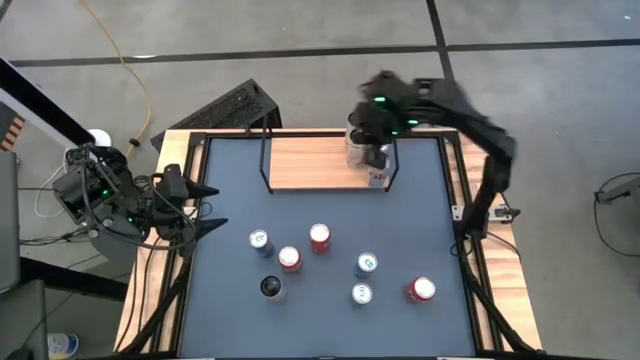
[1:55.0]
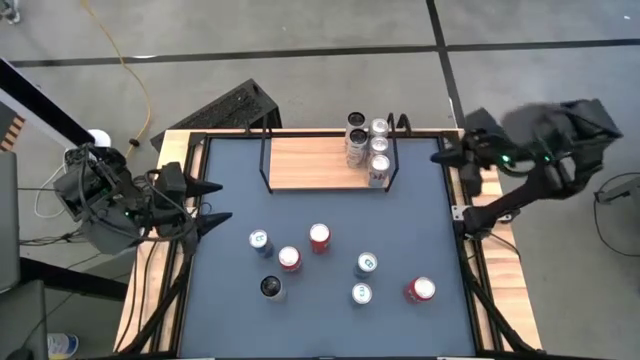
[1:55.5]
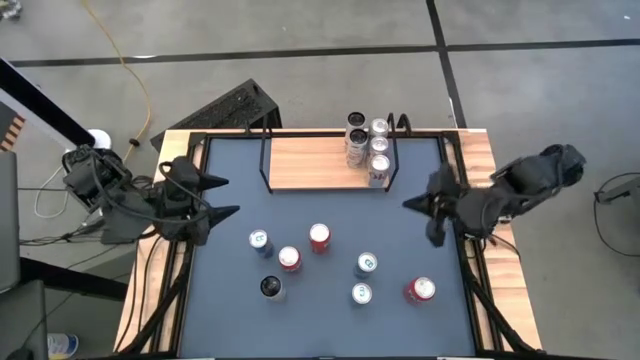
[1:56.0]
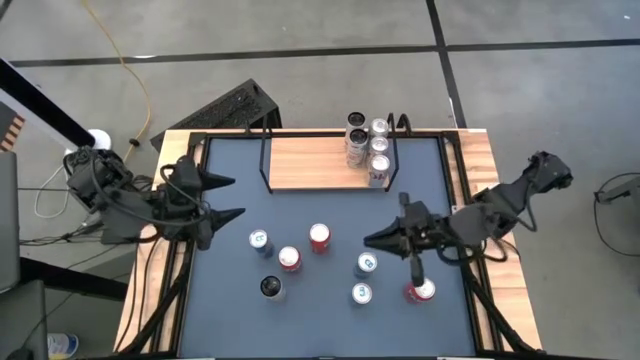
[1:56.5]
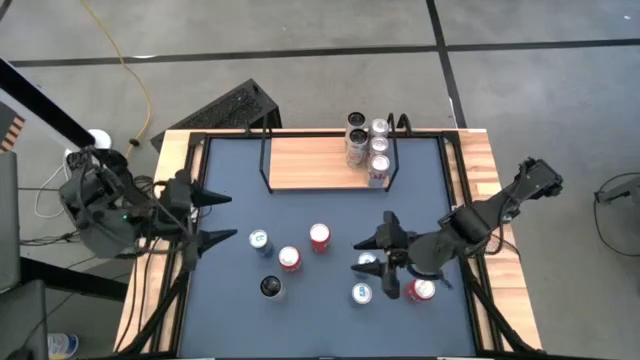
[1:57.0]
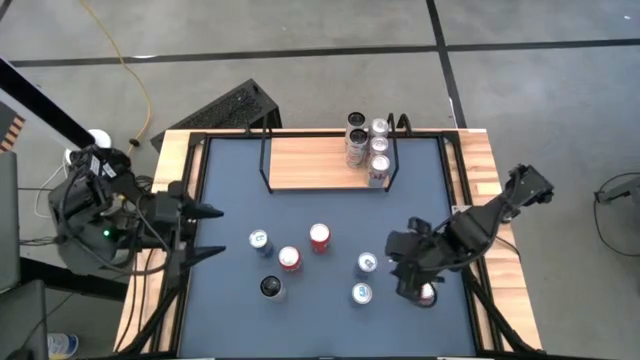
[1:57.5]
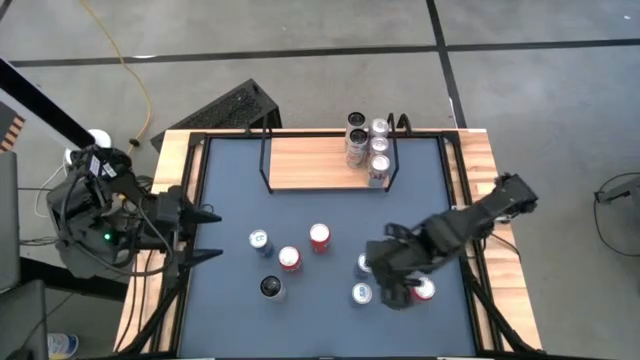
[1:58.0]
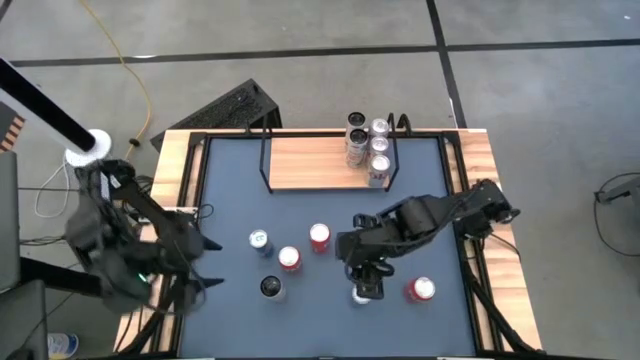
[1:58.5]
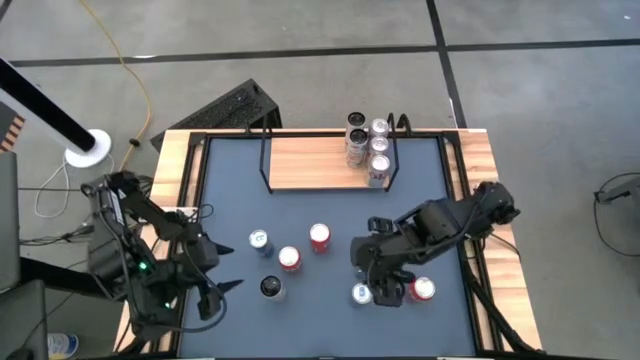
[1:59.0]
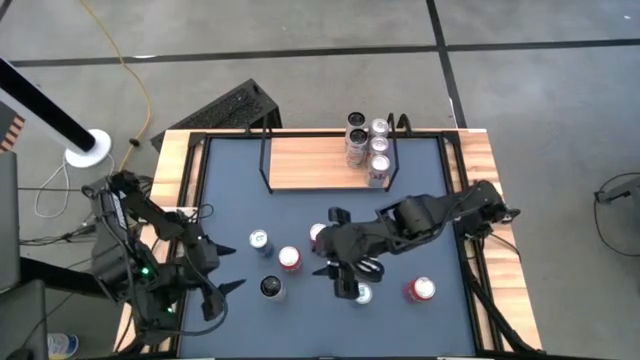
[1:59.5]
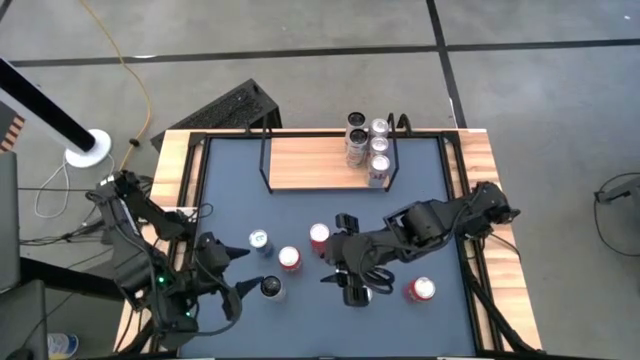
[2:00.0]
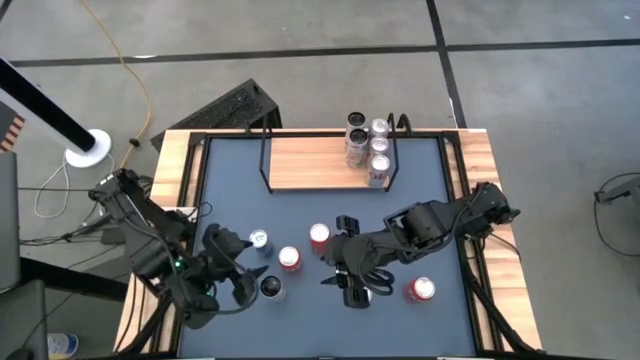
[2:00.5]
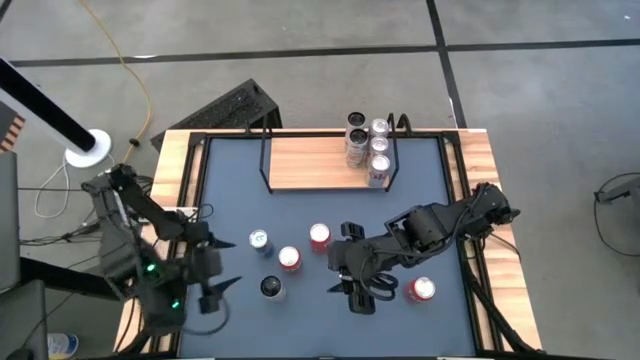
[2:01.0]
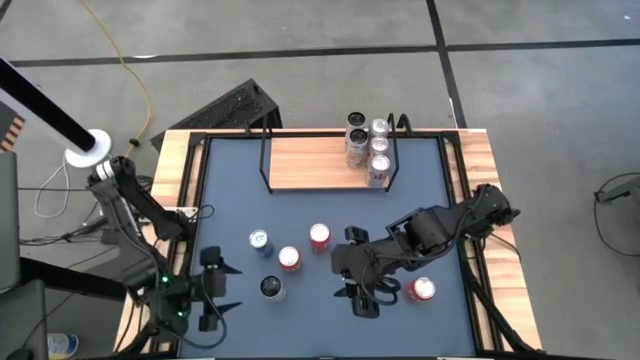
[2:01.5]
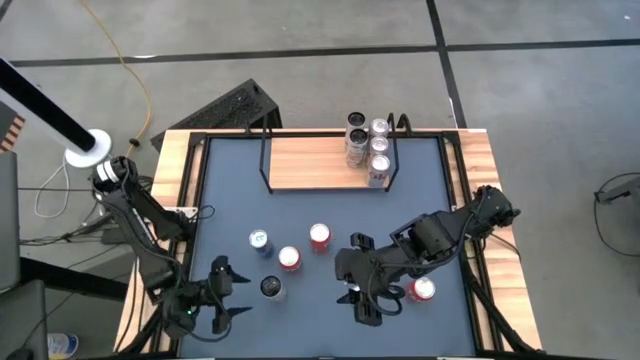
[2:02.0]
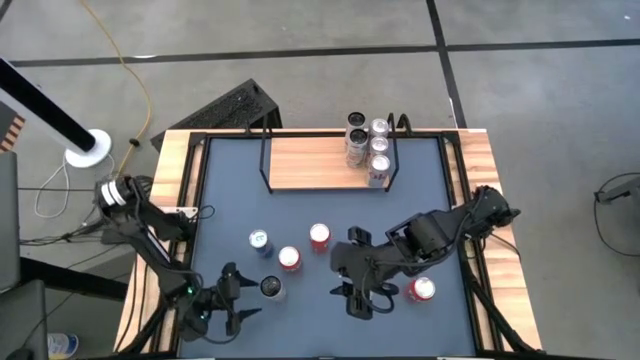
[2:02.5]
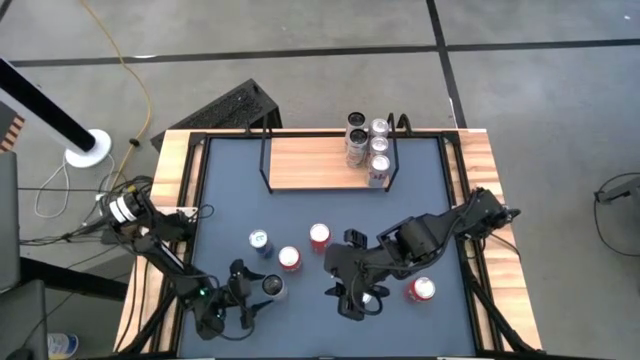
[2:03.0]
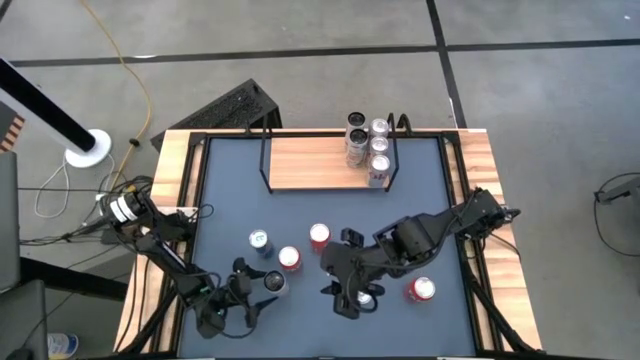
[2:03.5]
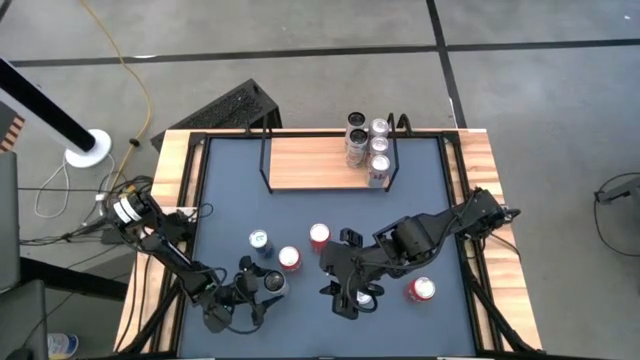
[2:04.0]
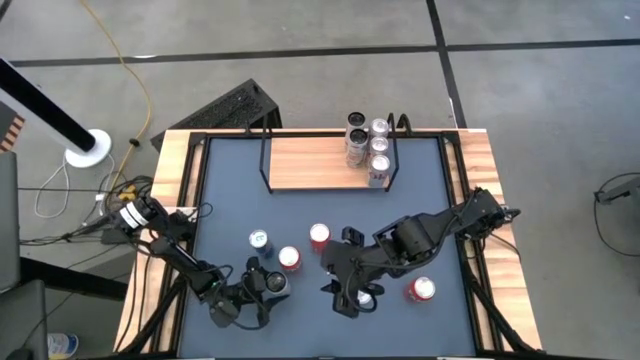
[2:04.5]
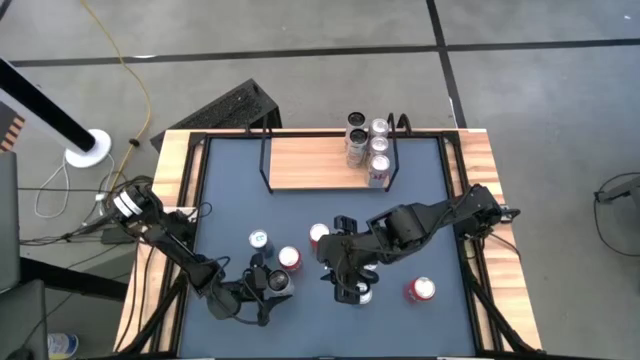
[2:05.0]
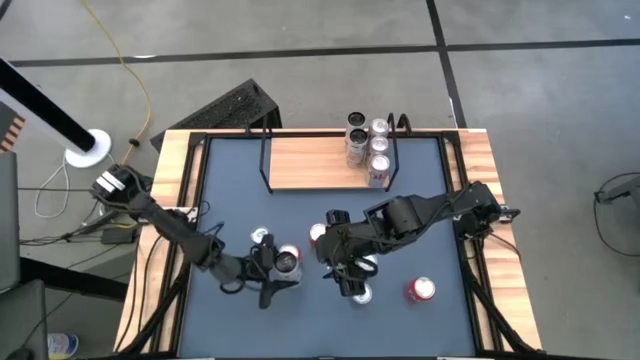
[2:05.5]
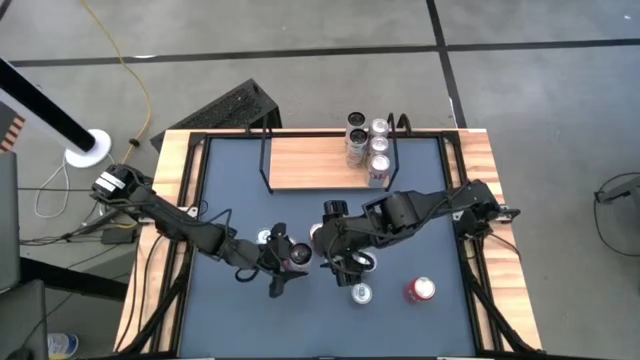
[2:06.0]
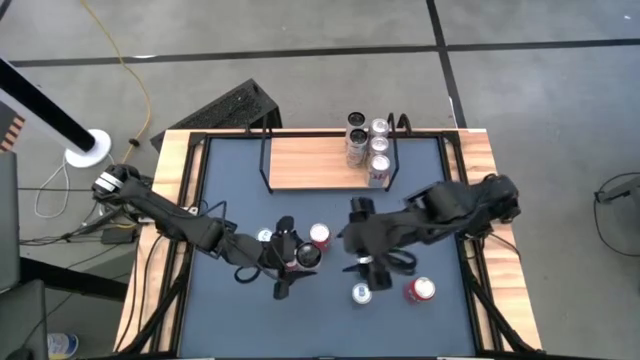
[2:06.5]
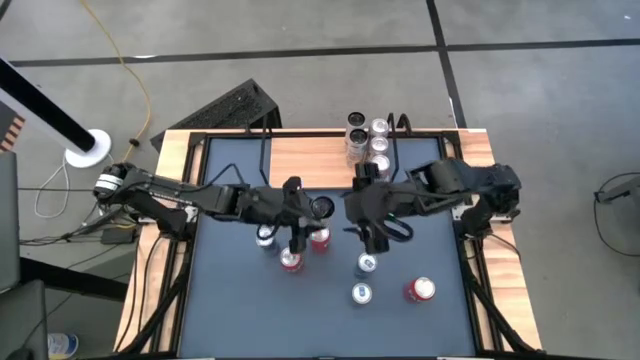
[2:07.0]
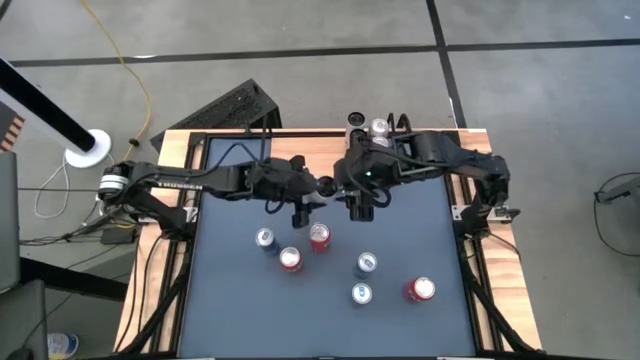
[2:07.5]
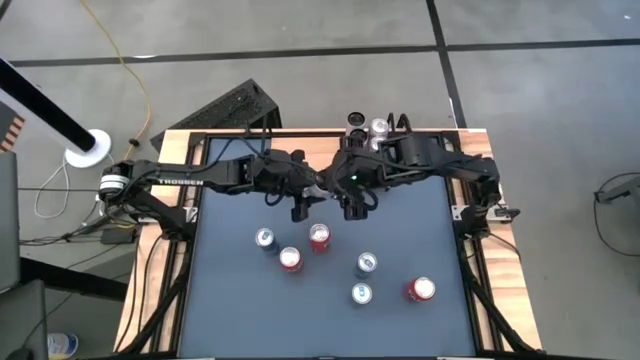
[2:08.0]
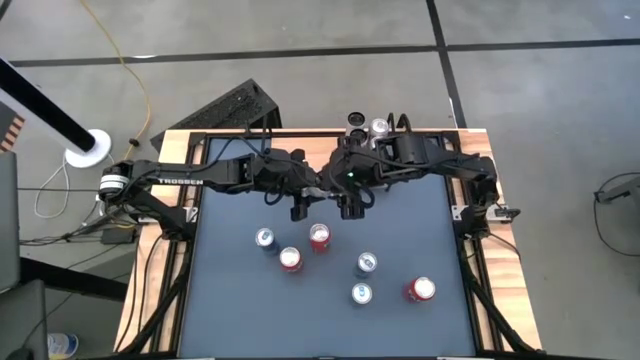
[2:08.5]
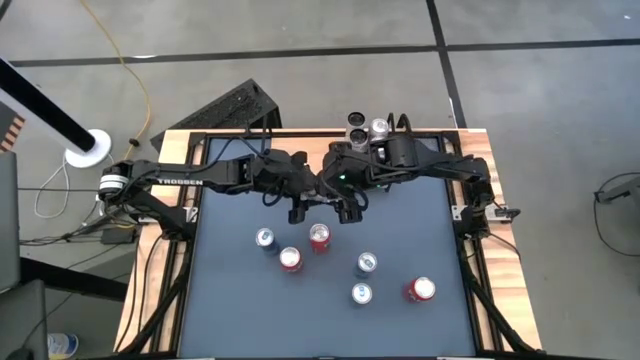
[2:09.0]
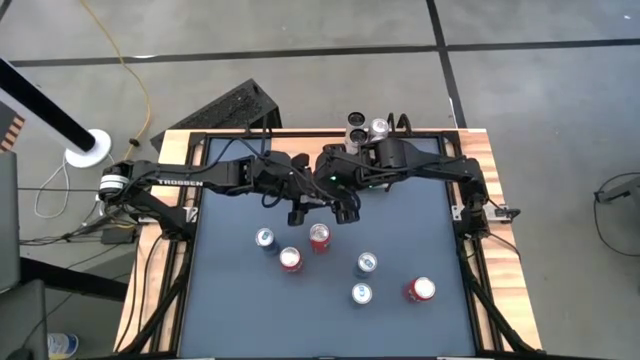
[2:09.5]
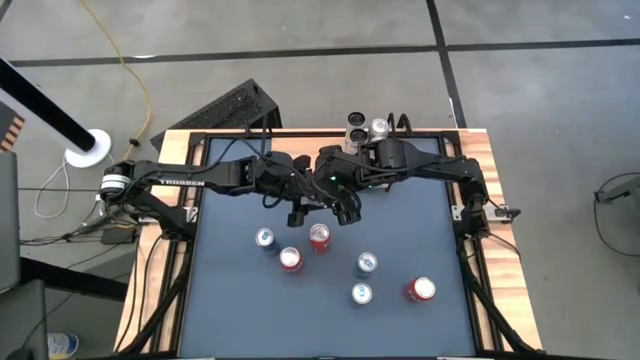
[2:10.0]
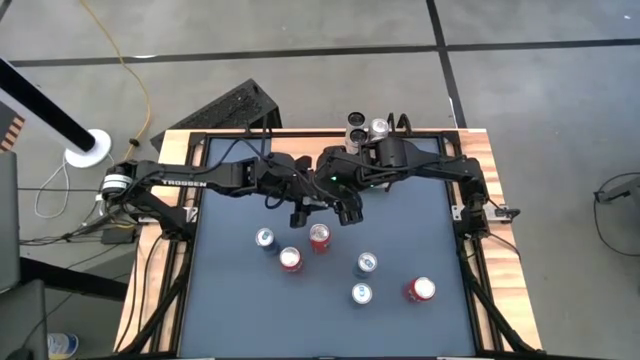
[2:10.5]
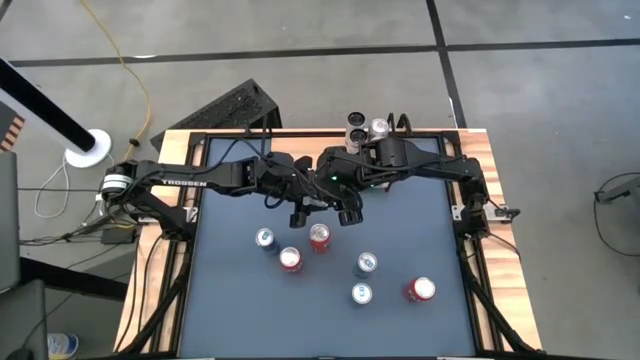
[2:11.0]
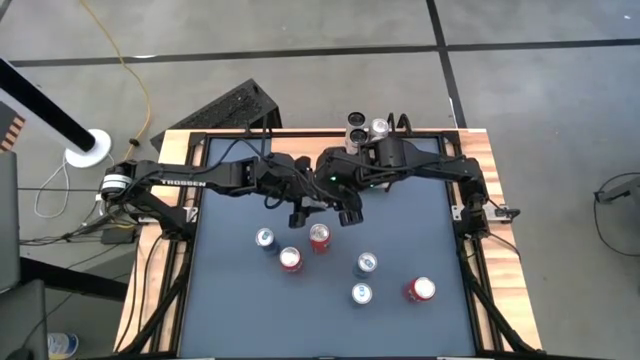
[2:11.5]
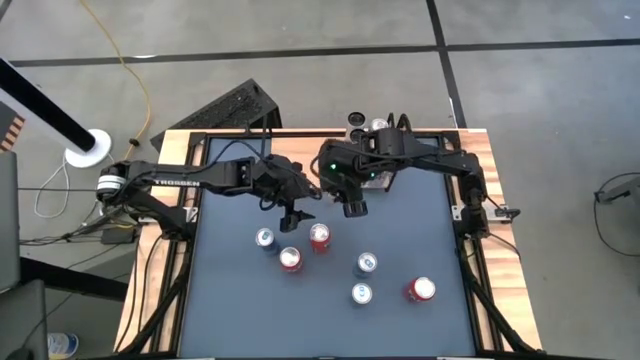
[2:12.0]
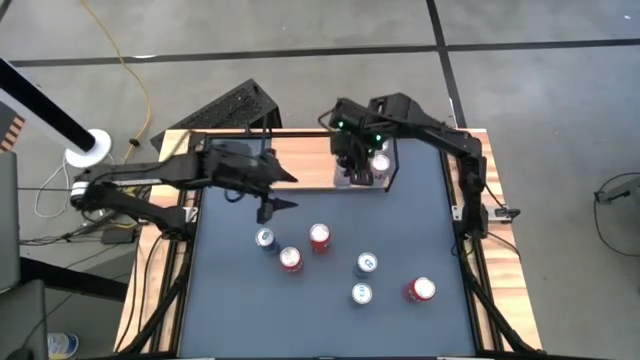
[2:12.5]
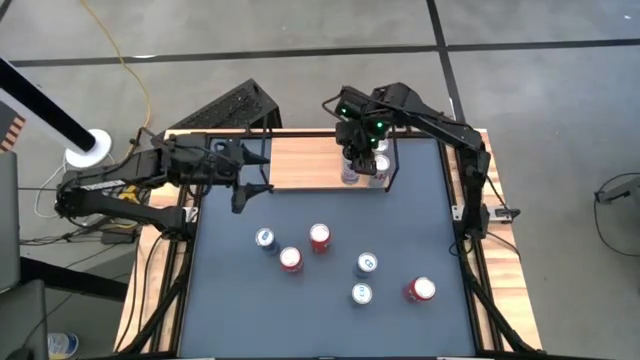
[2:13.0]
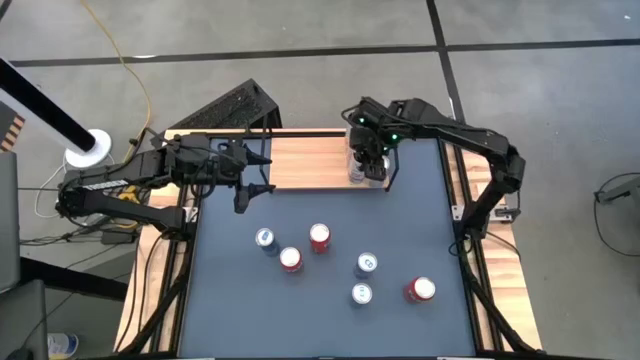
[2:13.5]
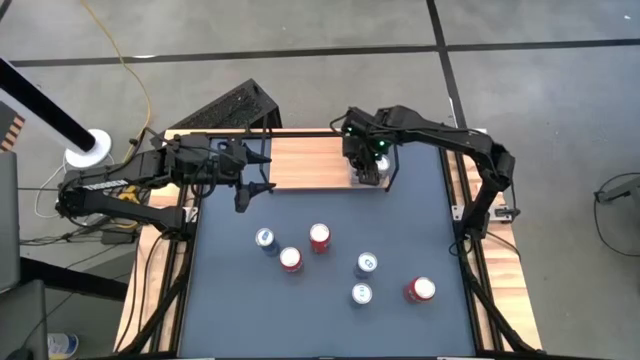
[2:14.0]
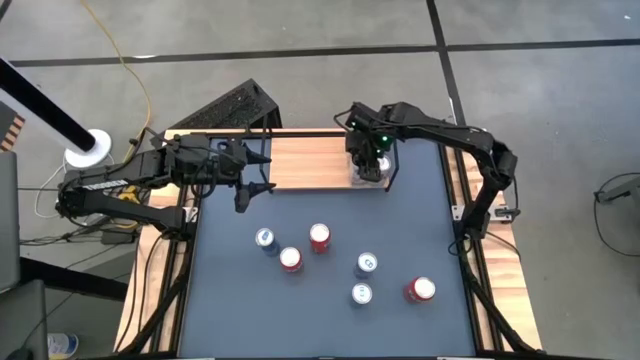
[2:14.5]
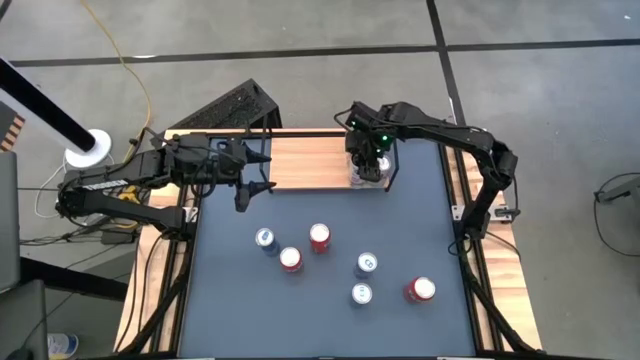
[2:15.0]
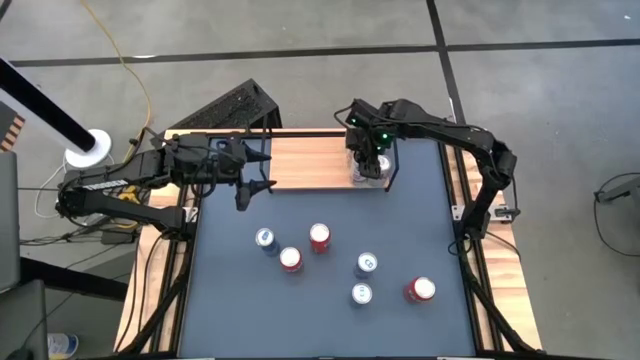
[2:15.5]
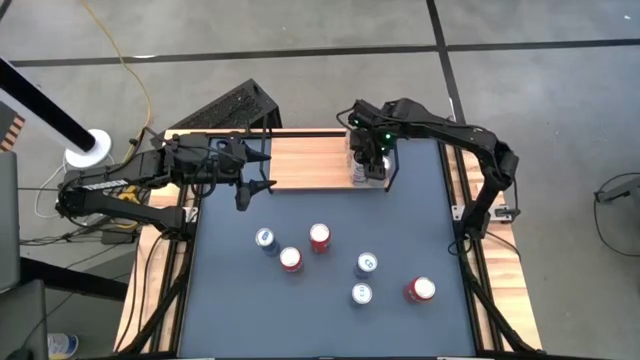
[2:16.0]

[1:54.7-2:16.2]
Task: Place canned beverage on shelf
Put the white soda can on the shelf aligned with the other white soda cans
